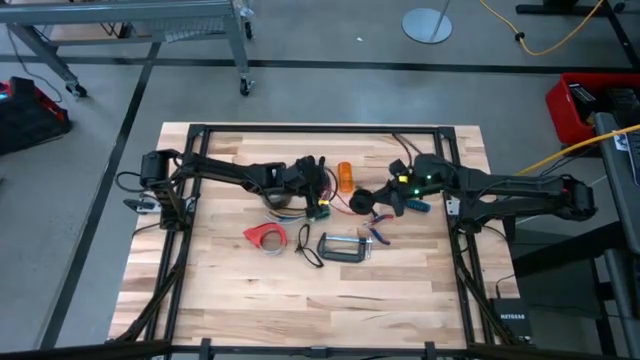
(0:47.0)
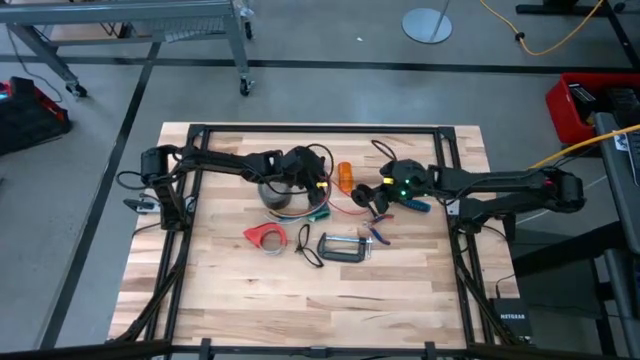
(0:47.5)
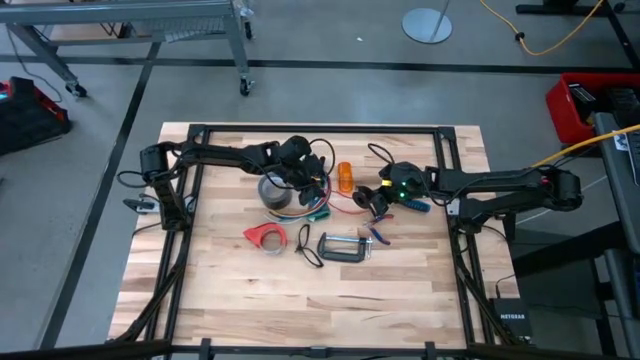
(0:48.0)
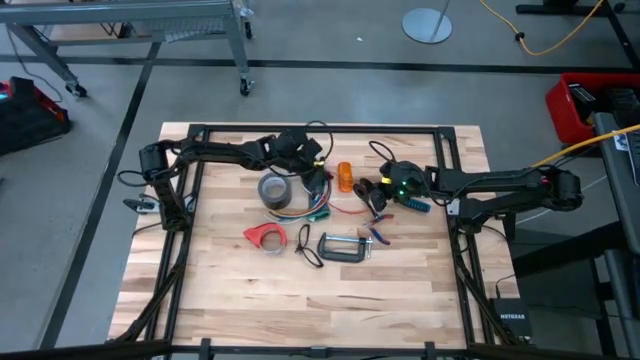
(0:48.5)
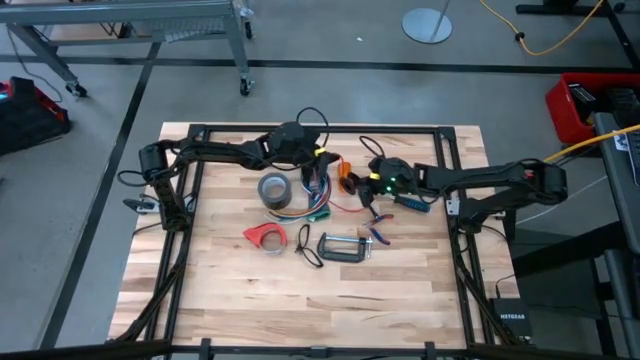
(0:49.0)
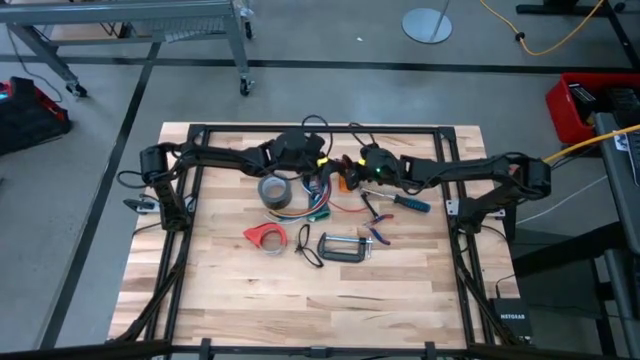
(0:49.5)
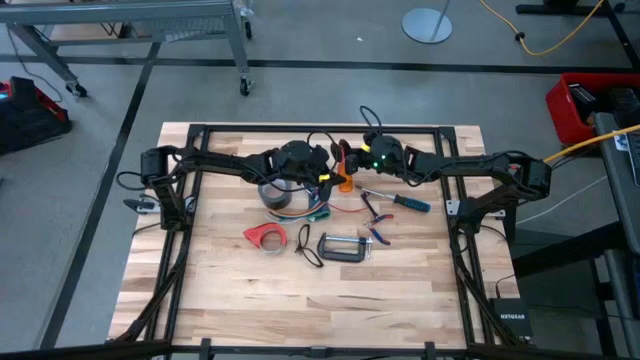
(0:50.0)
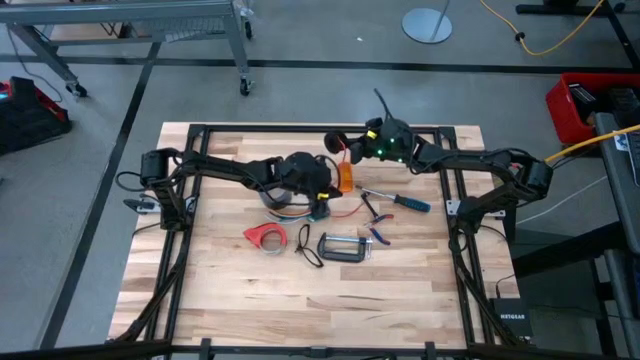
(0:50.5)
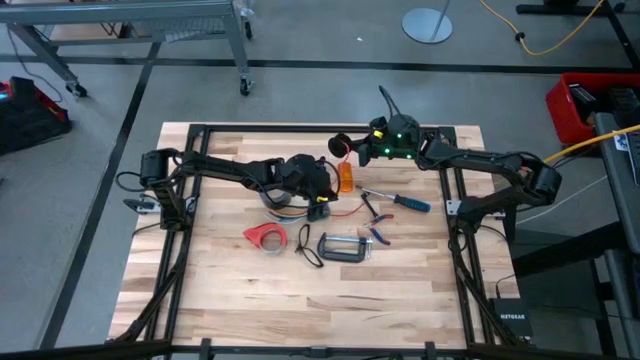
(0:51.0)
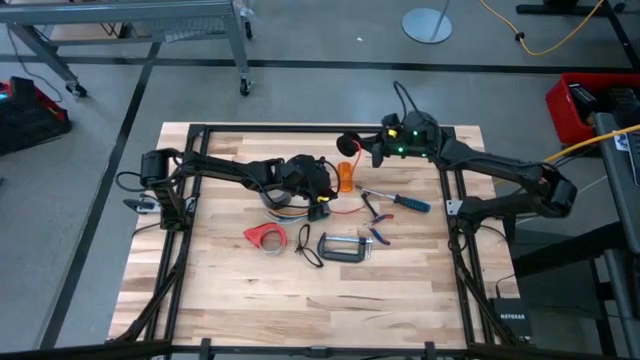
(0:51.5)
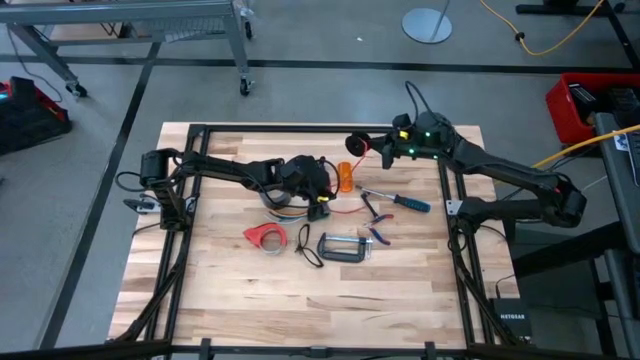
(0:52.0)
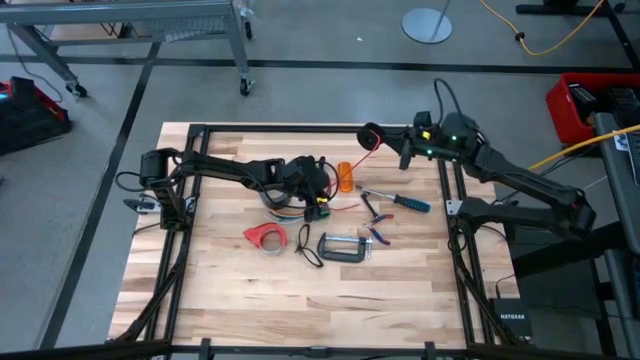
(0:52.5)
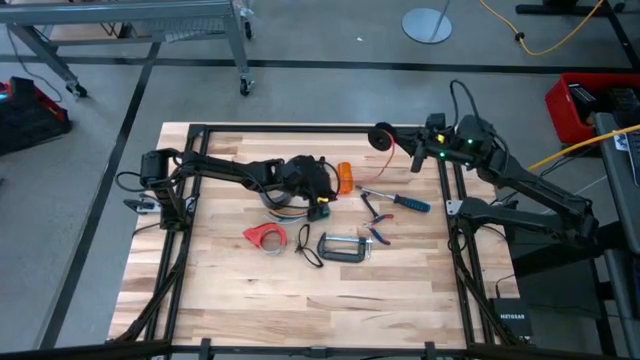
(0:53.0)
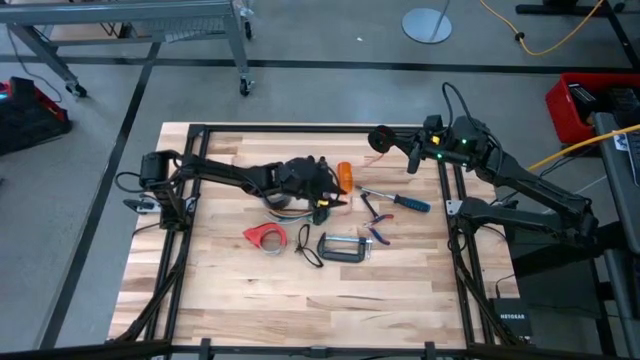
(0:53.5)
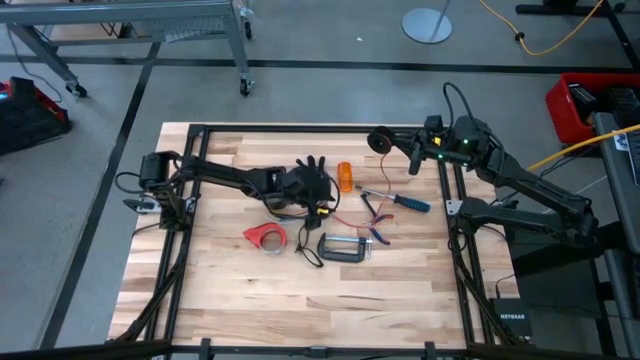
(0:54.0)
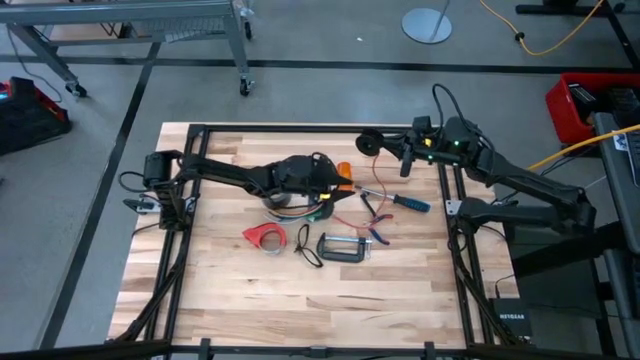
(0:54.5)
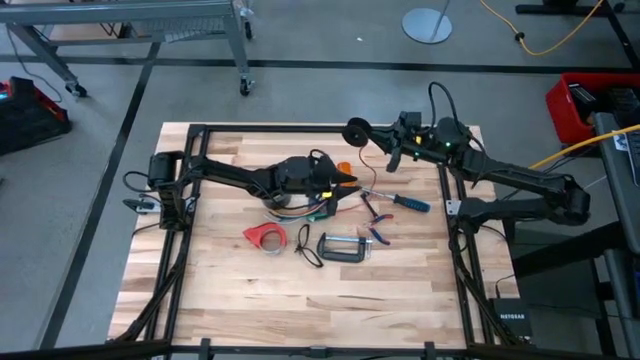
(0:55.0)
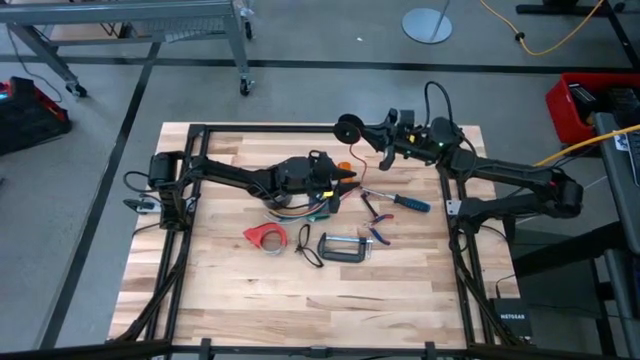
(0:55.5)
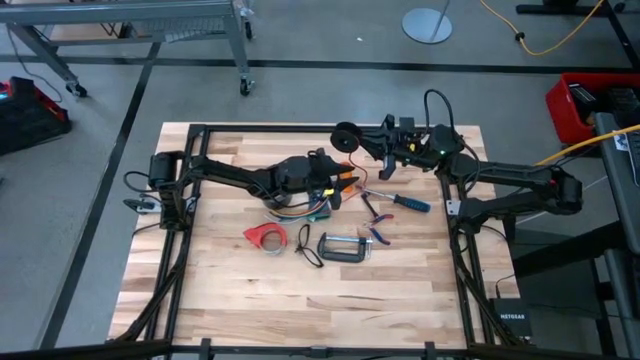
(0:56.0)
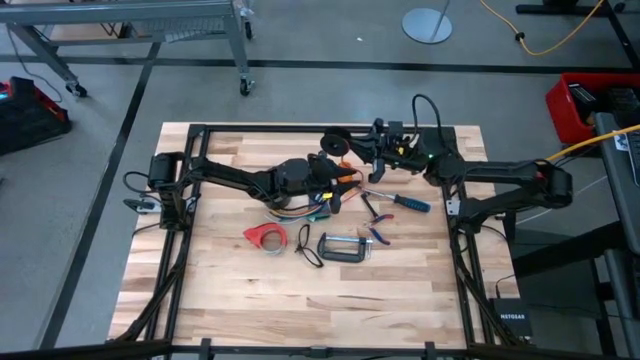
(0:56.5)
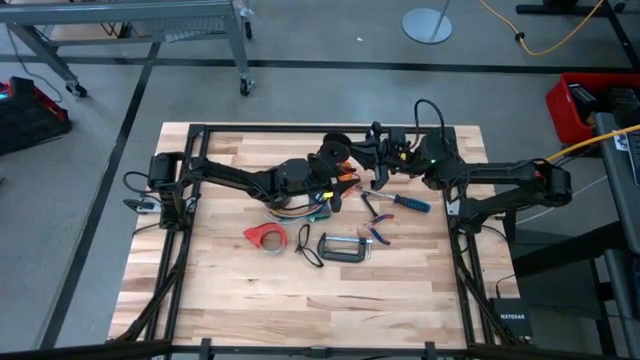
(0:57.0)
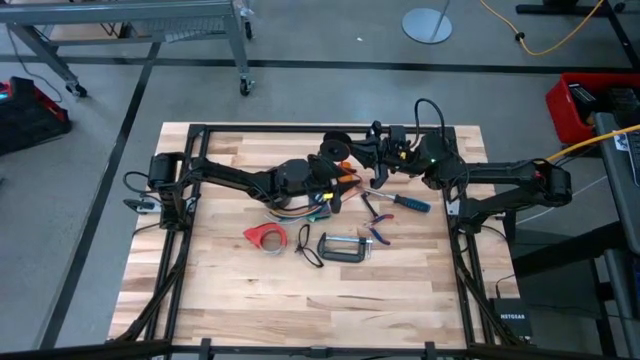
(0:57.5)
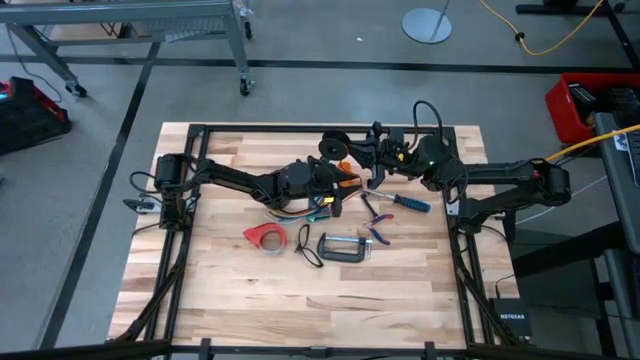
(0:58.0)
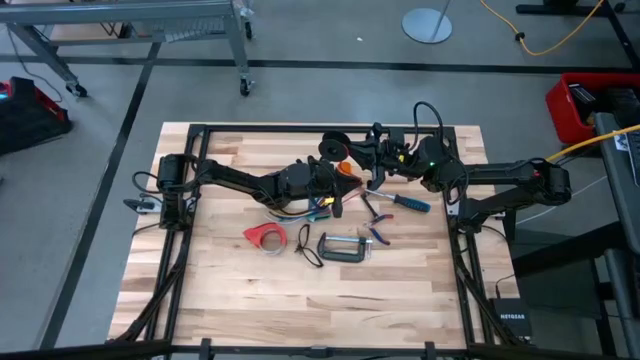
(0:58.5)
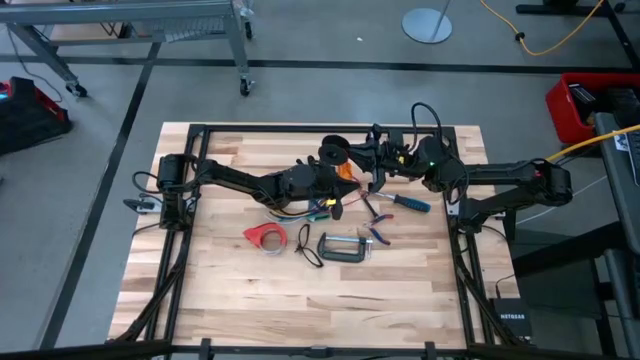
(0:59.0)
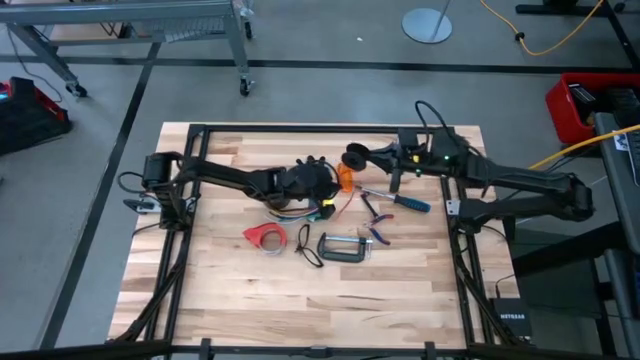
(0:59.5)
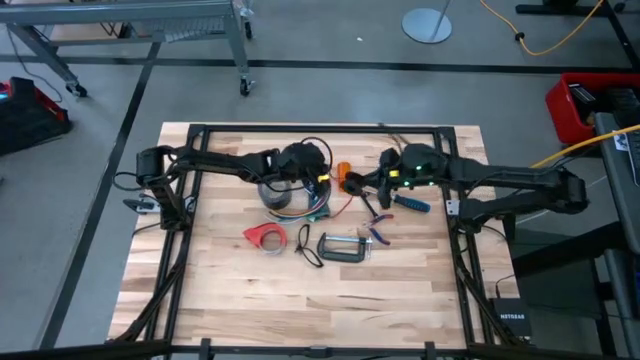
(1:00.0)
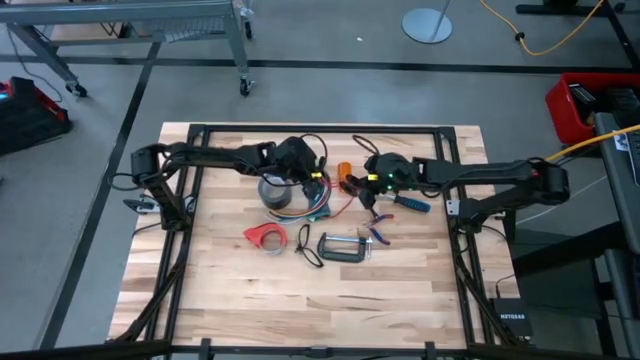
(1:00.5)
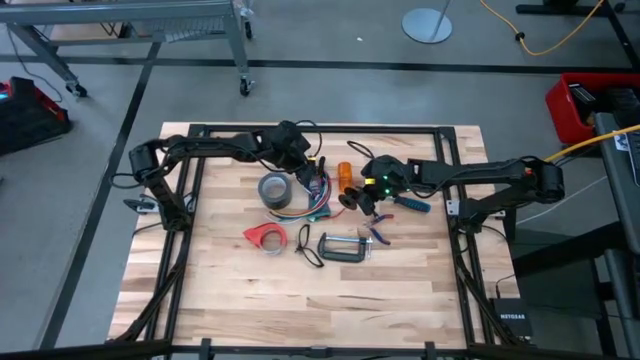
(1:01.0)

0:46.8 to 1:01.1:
Task: Coil cords
Coil the red wire

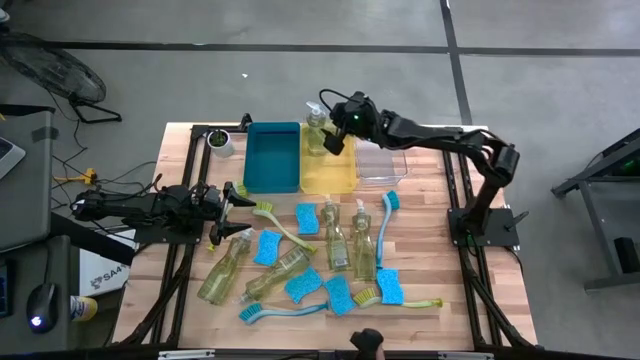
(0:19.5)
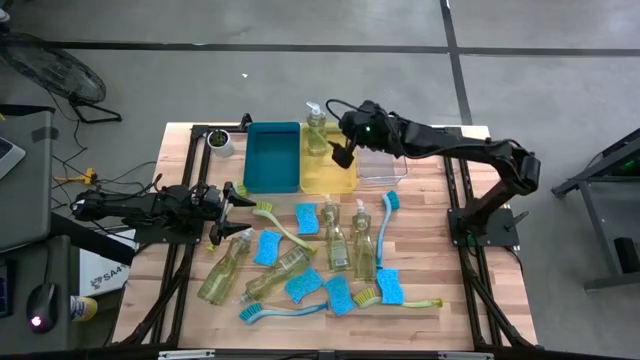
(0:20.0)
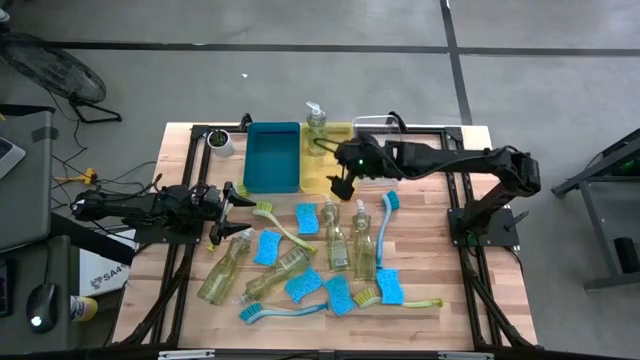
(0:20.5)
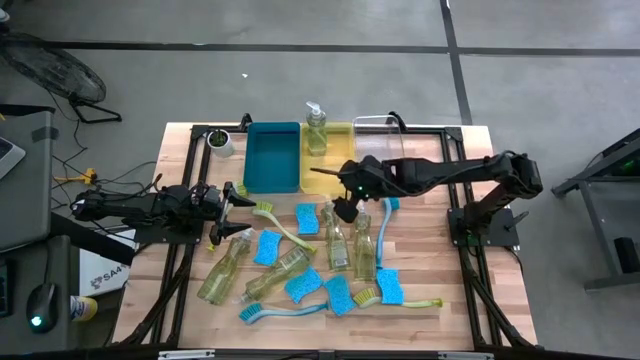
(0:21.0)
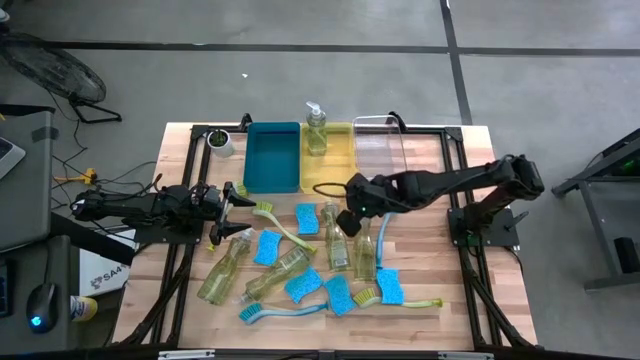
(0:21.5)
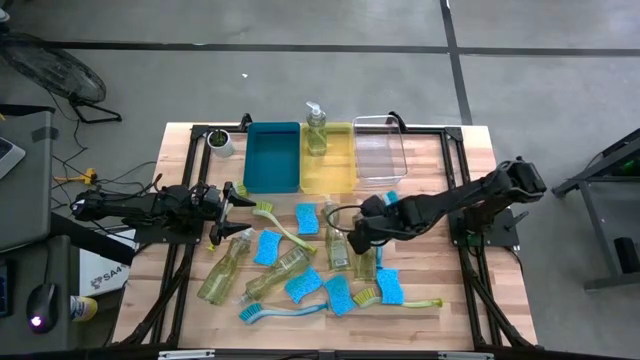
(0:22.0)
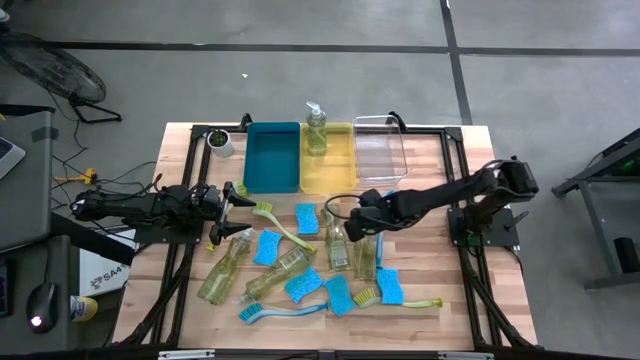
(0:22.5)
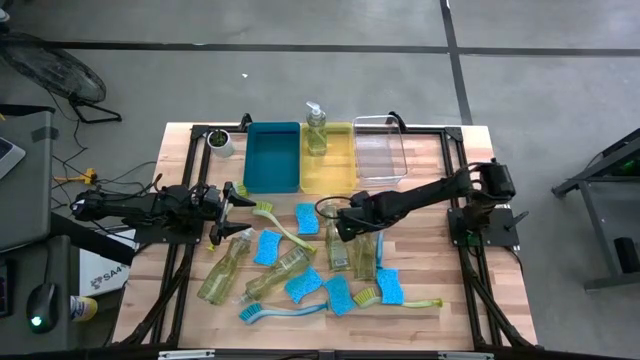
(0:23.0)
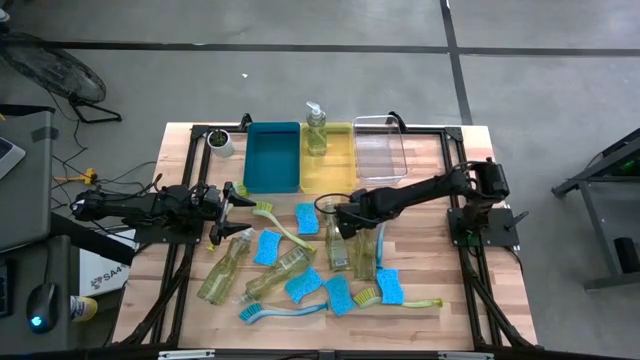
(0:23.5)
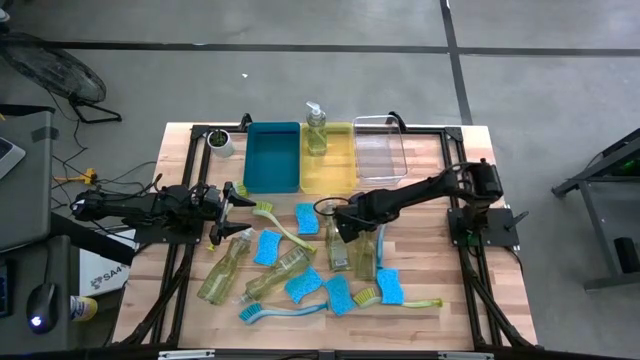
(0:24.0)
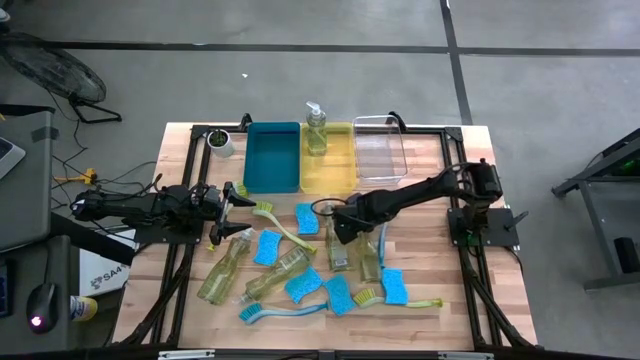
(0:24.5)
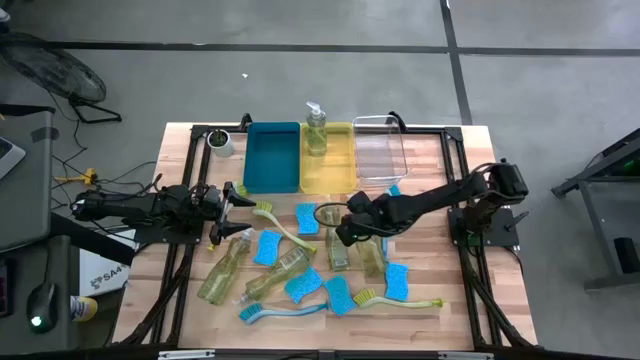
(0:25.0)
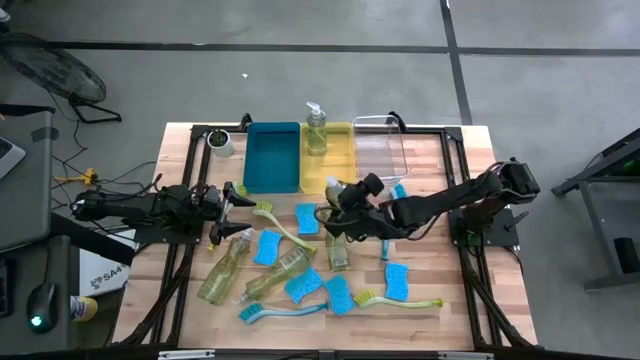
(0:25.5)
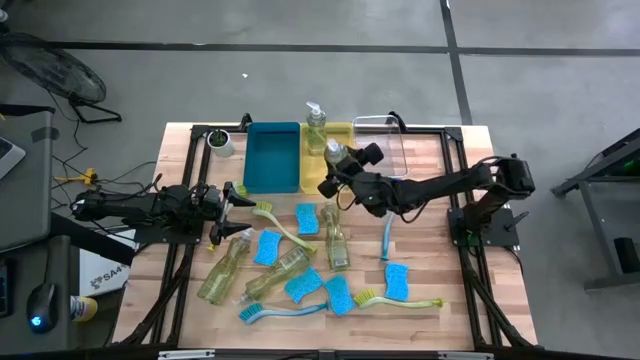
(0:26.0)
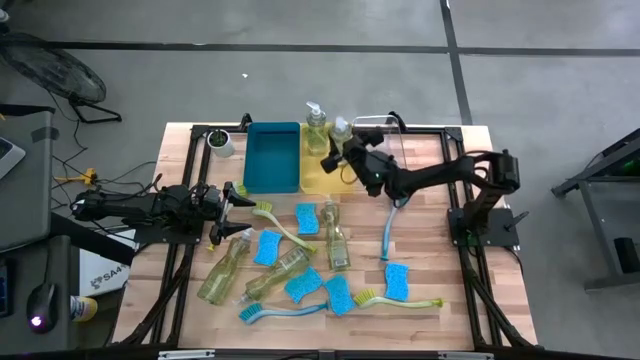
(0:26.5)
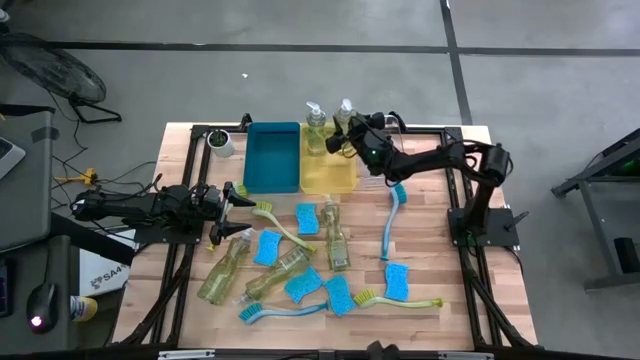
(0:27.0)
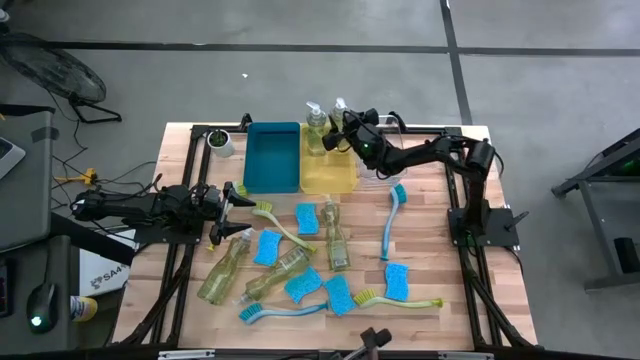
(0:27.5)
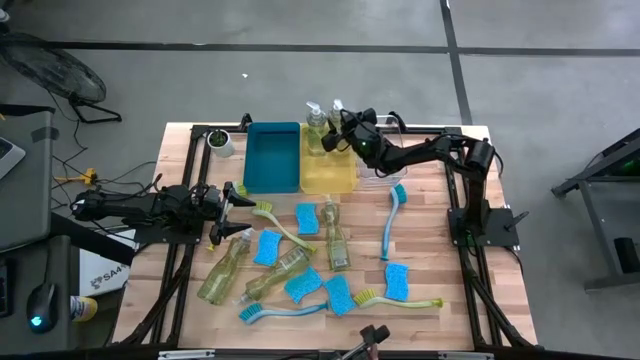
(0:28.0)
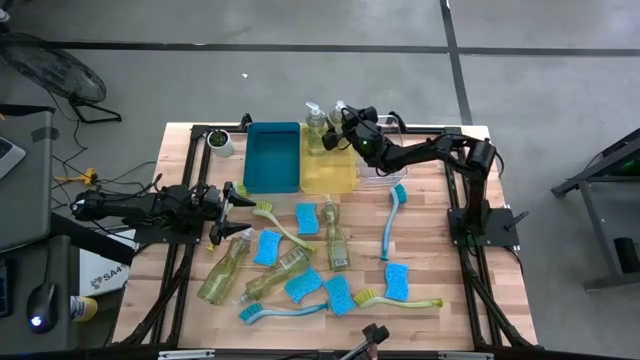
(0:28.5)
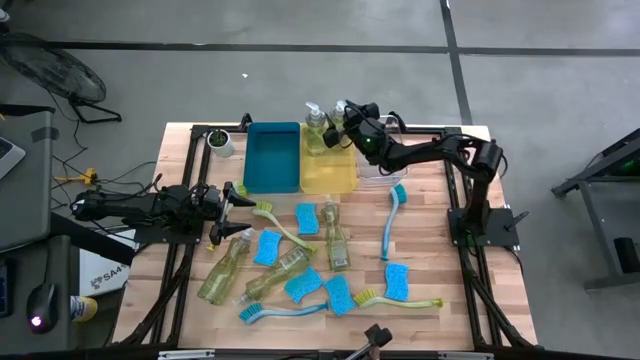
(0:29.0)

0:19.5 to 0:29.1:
Task: Pick & Place Kitchen Sink Supplies
Put the dishwashing liquid into the yellow bin
